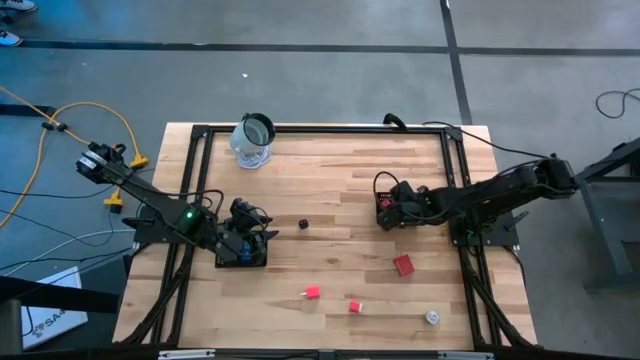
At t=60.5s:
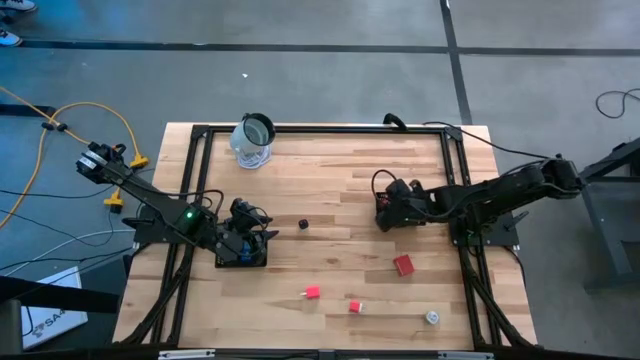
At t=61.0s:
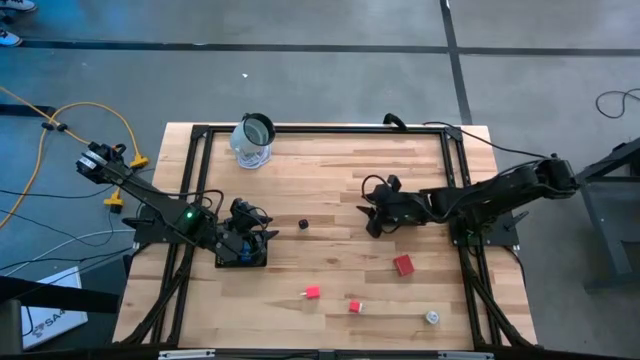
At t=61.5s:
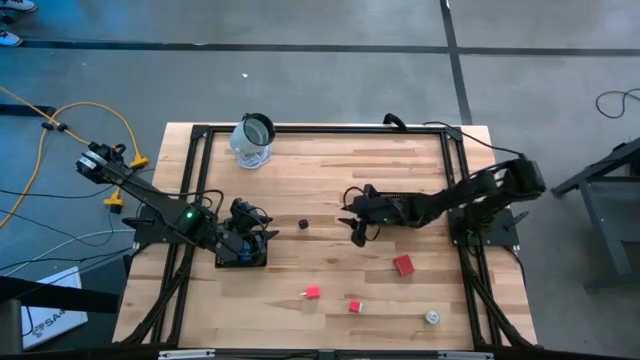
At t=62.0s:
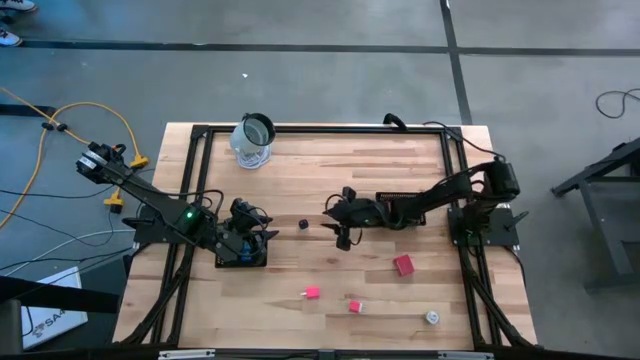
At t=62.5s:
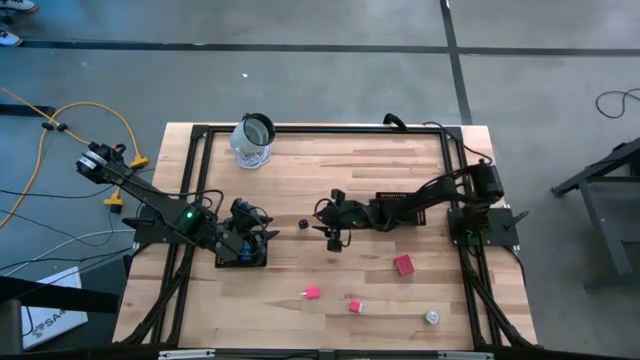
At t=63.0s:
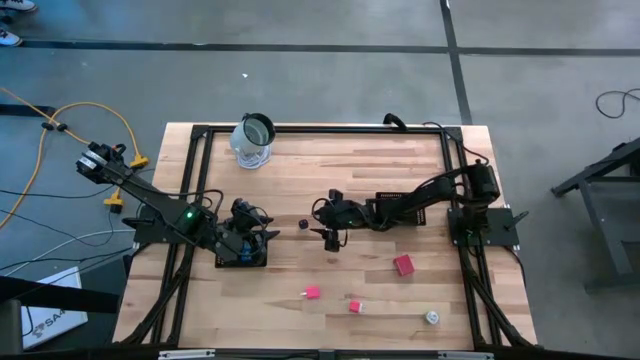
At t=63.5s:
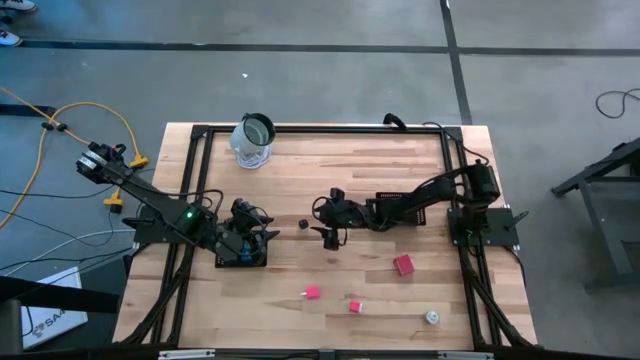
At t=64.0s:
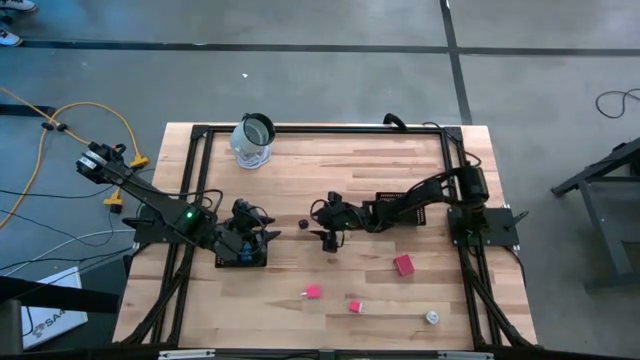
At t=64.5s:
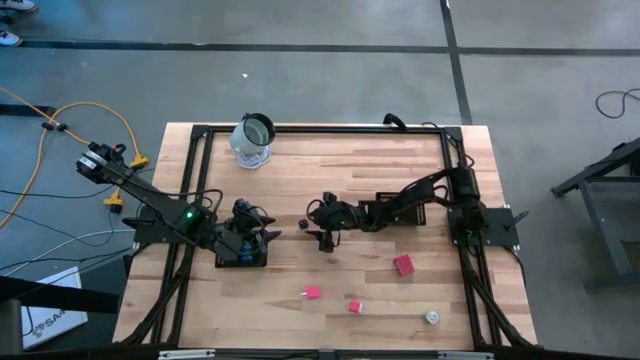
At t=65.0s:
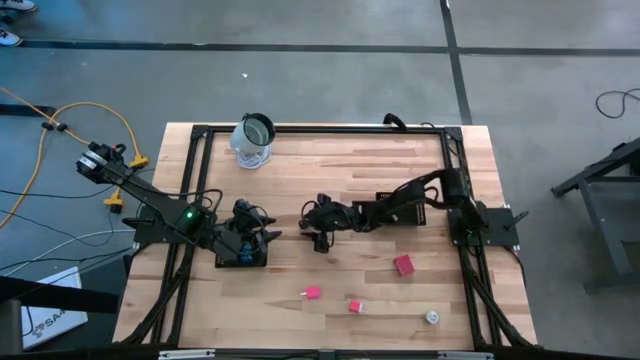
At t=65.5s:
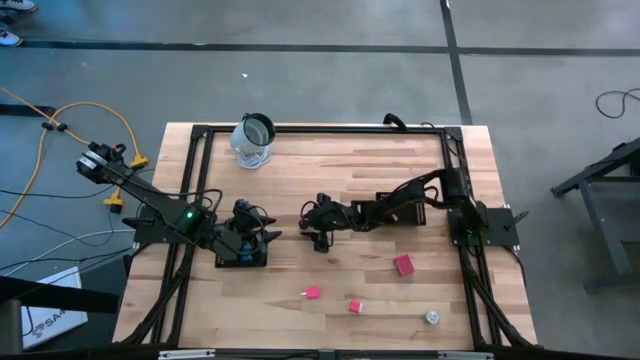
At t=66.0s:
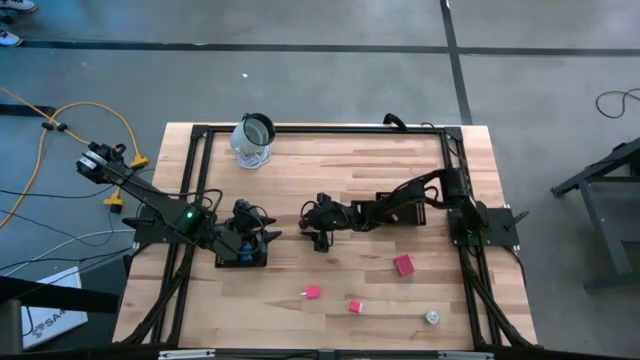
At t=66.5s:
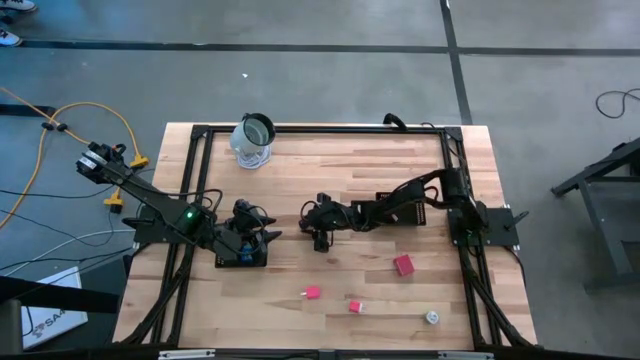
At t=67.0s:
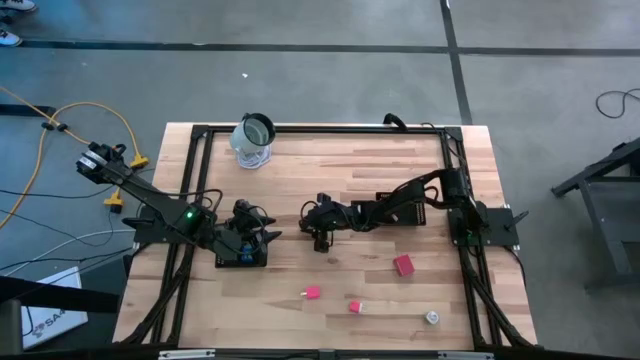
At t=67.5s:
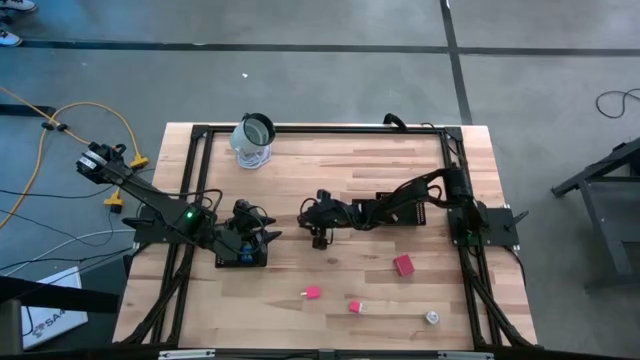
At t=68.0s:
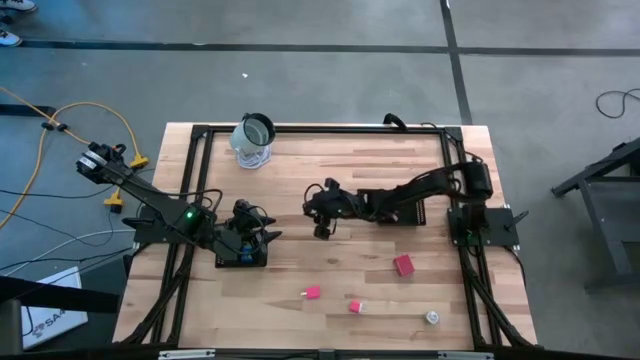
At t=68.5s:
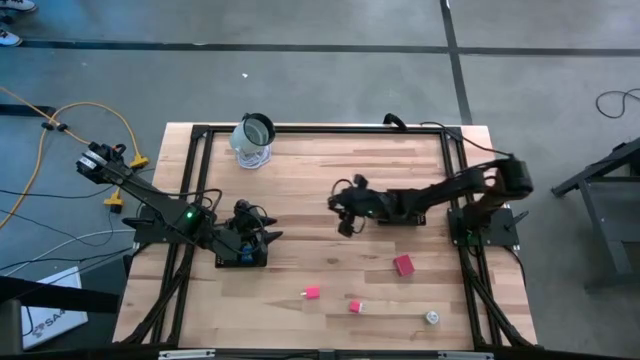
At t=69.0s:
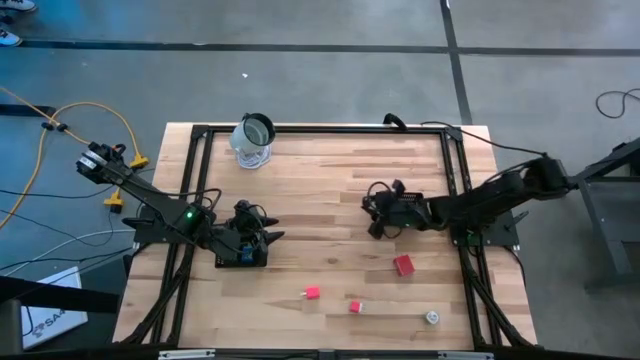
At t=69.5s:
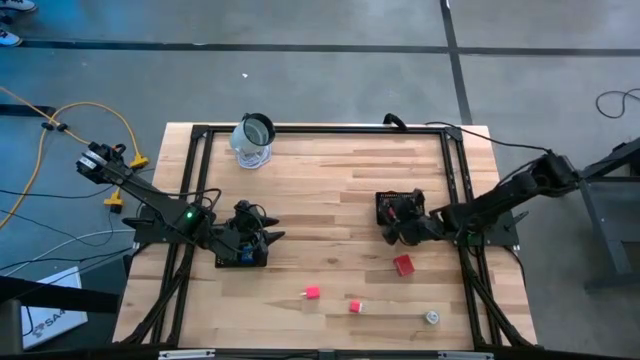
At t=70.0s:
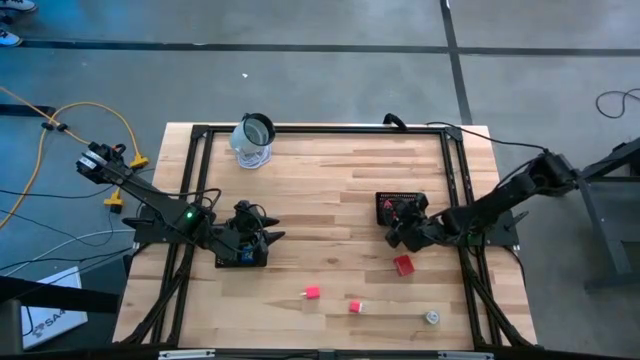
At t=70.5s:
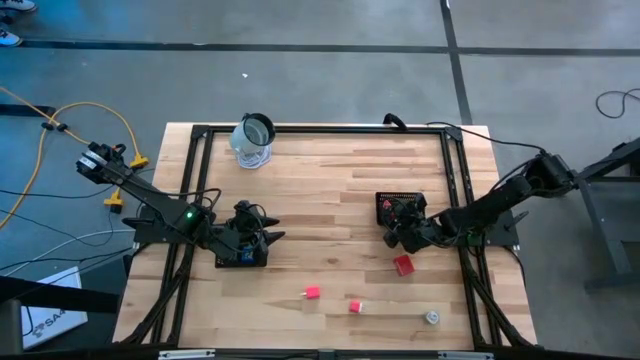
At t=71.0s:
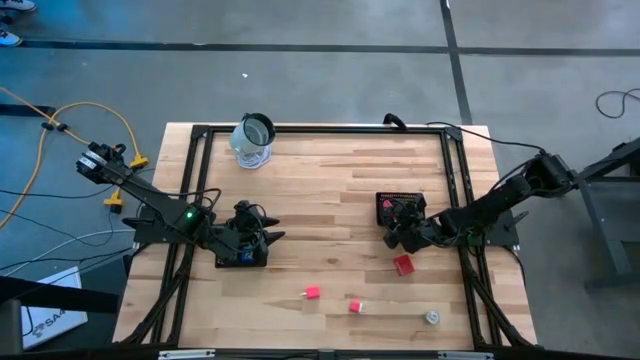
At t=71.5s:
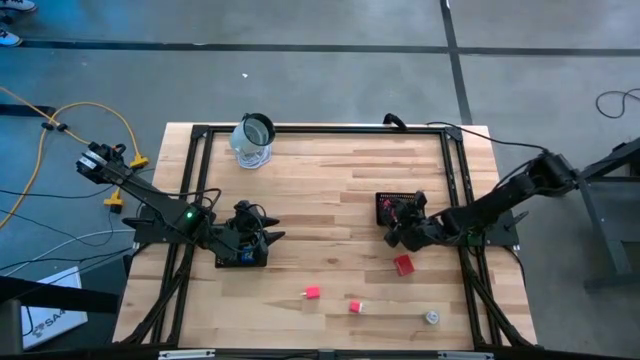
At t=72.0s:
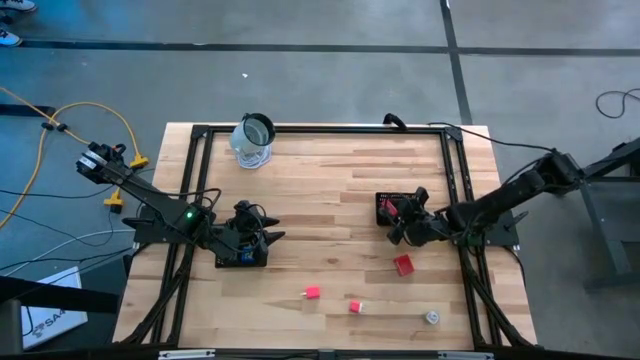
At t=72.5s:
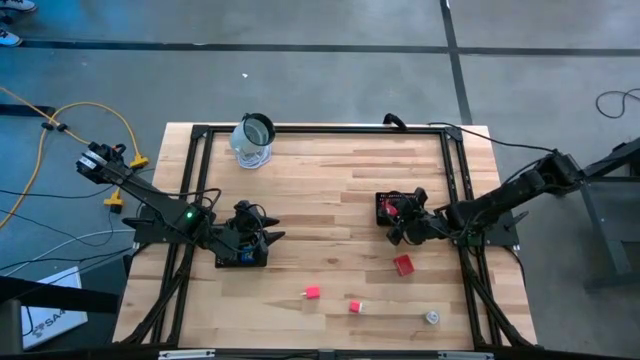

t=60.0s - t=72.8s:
Task: Pick & Place Office items
Put the white charger adapter into the right black bin

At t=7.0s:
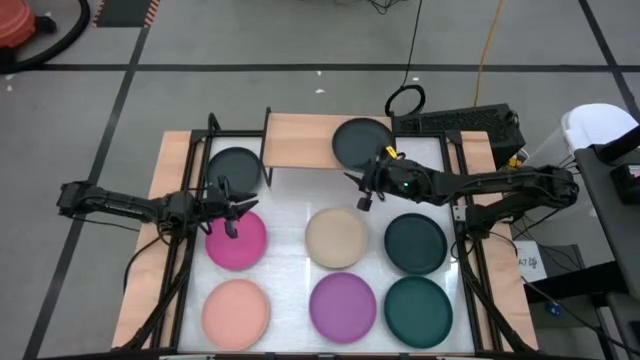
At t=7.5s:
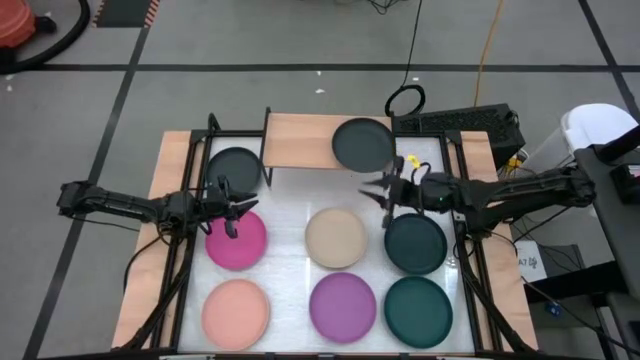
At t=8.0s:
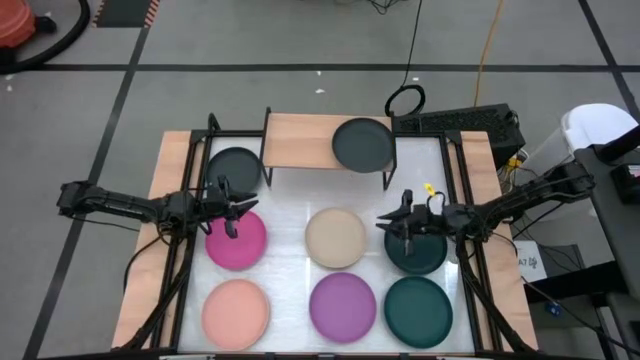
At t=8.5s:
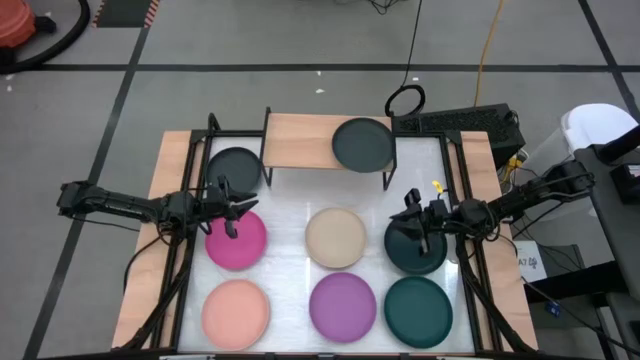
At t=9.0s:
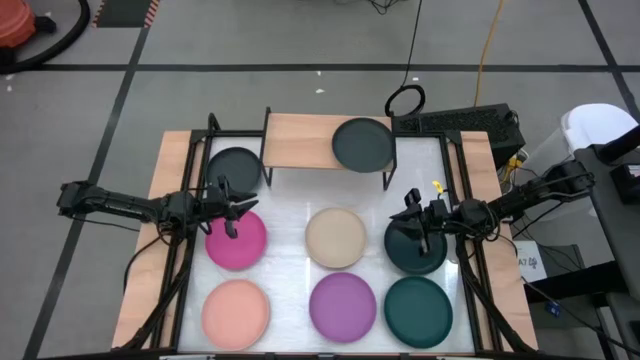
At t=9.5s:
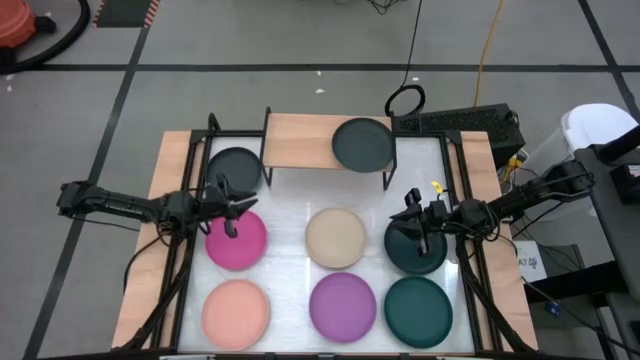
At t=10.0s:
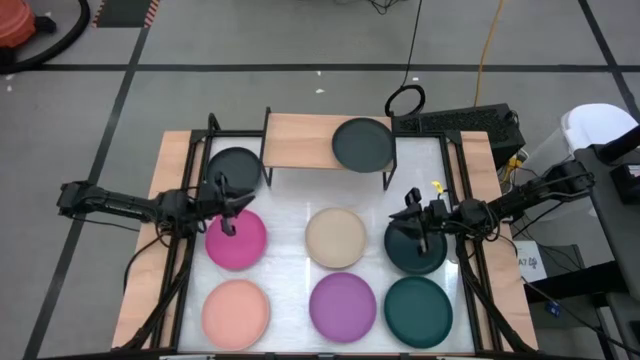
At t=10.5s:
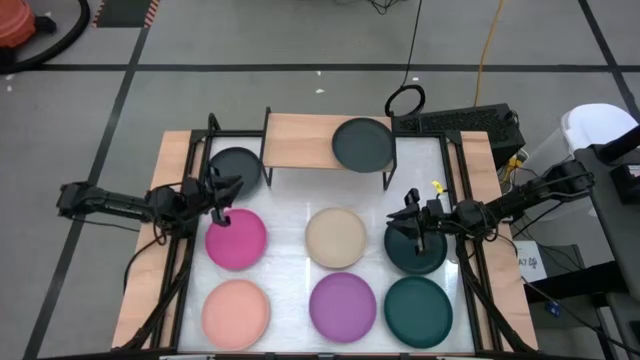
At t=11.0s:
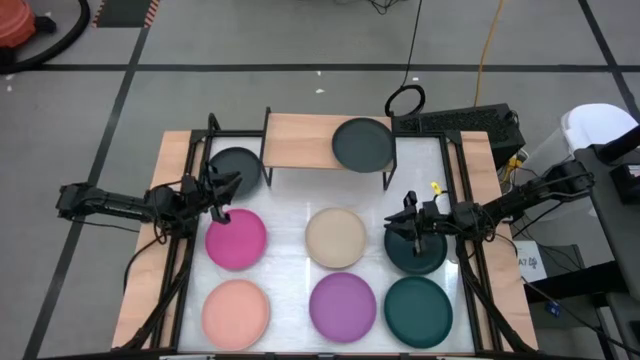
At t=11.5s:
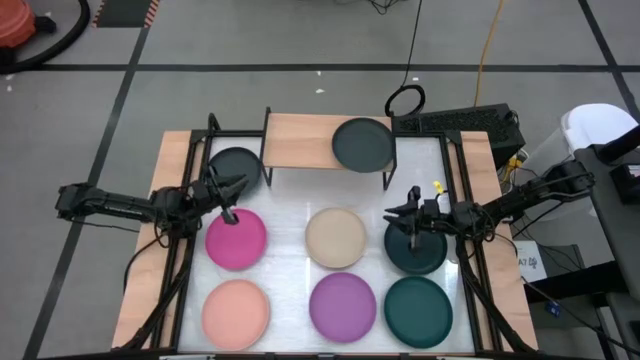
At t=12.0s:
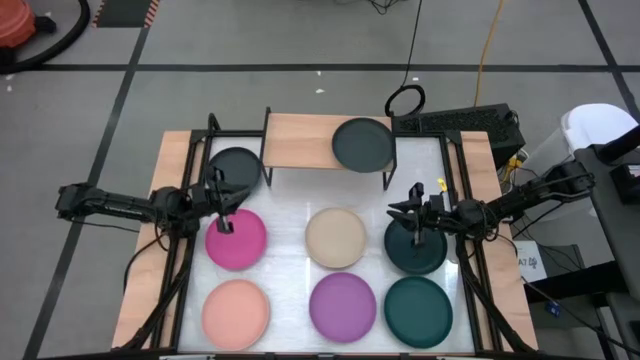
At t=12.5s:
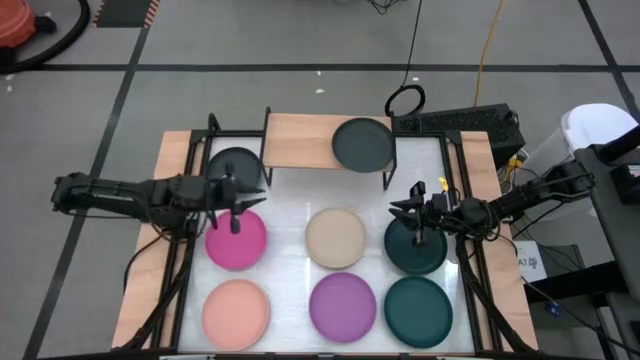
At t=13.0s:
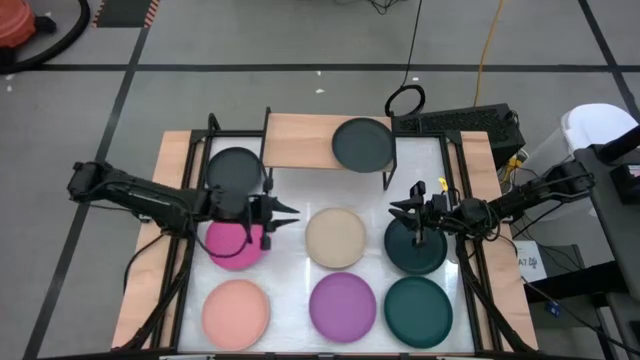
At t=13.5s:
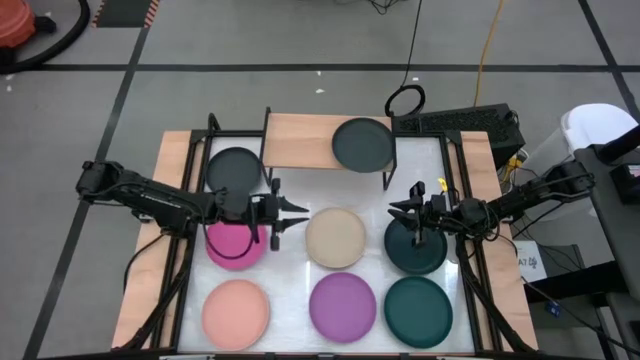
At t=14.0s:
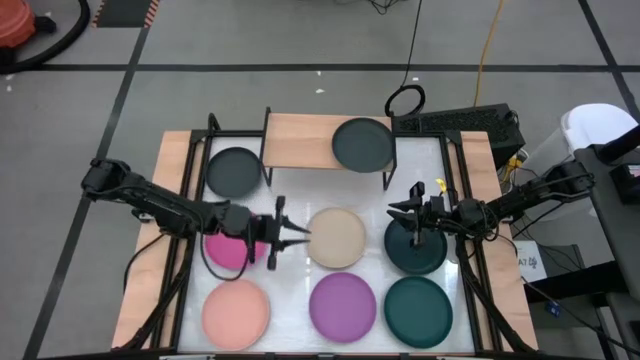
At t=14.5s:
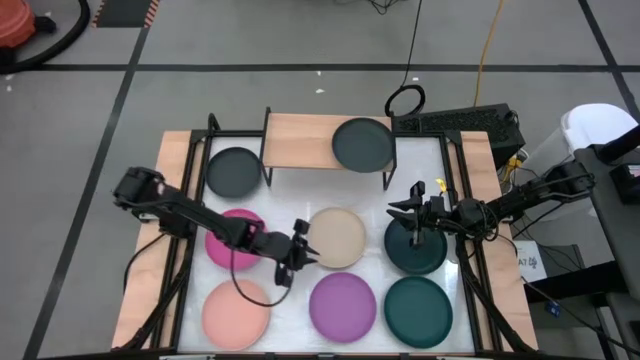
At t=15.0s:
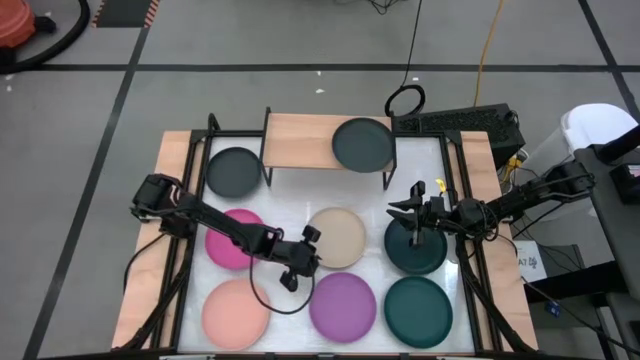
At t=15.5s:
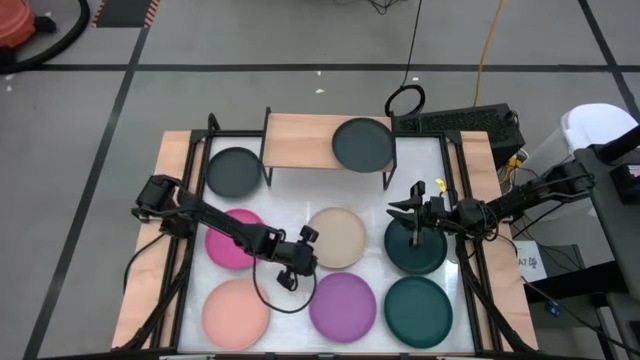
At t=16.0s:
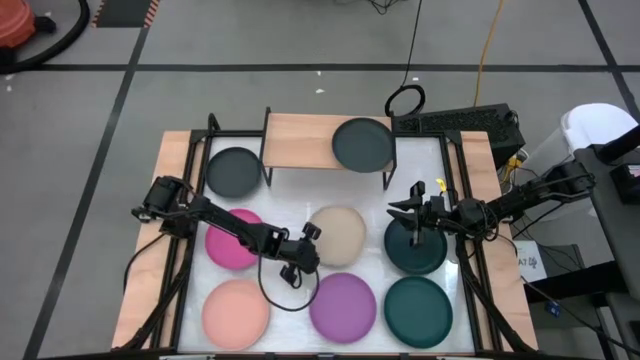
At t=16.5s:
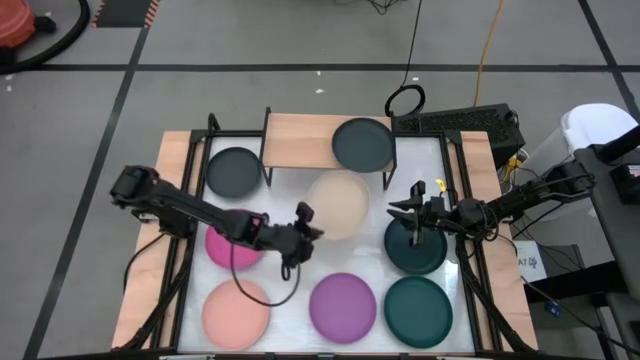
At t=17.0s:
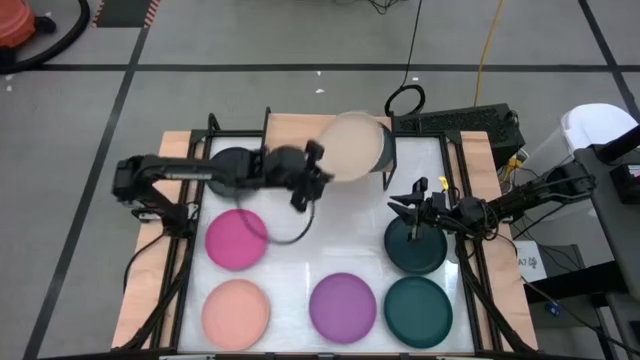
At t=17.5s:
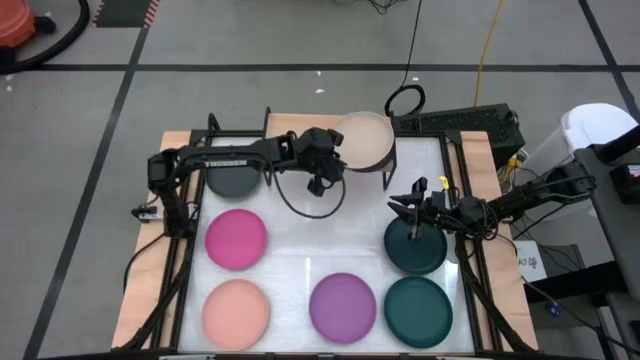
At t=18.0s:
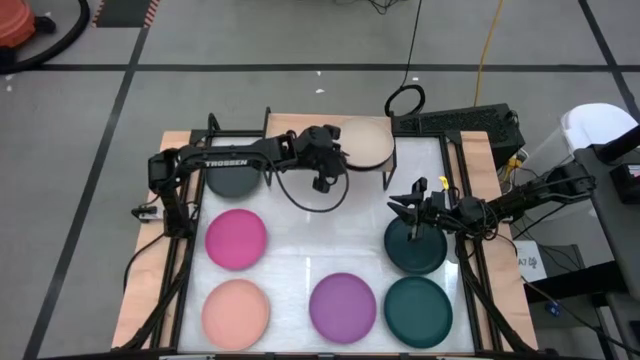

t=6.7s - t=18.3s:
Task: Place and stack plates onto a shelf
Stack the light brown plate on top of the black plate on the shelf
